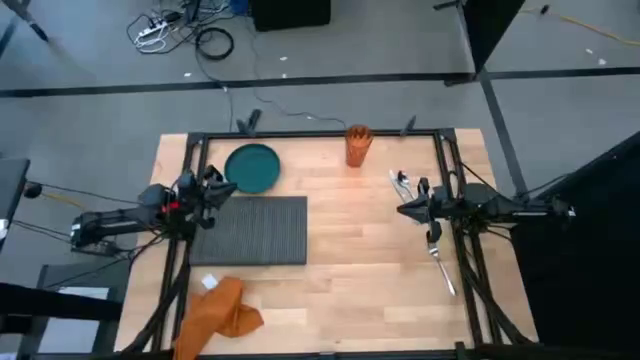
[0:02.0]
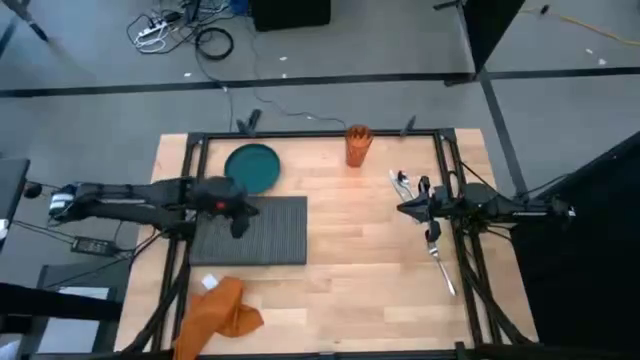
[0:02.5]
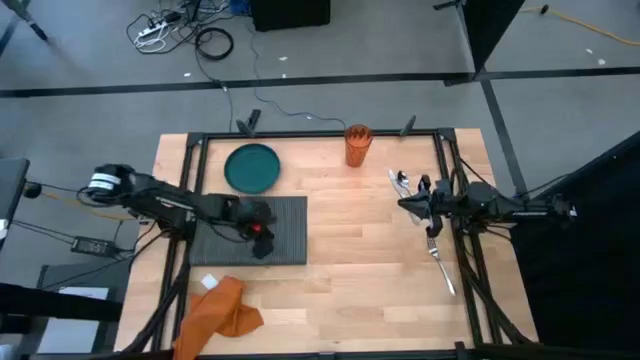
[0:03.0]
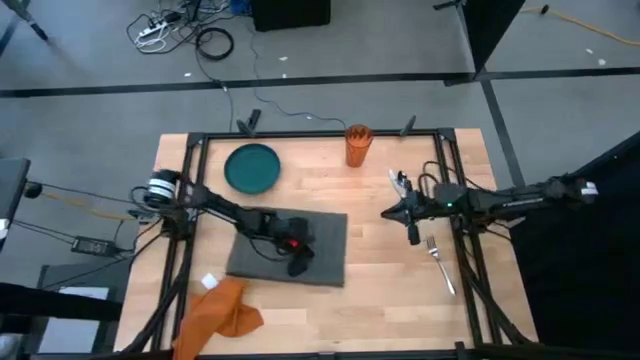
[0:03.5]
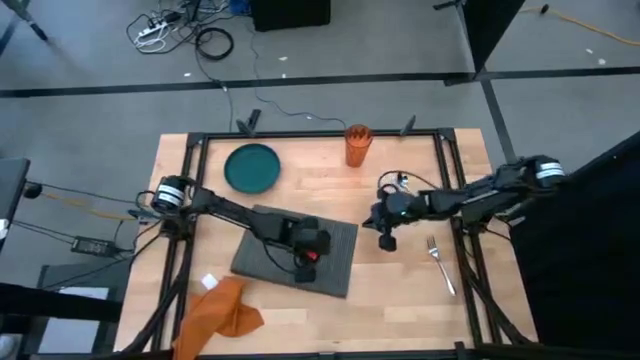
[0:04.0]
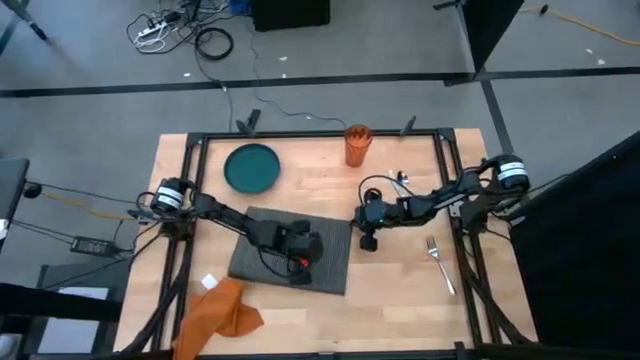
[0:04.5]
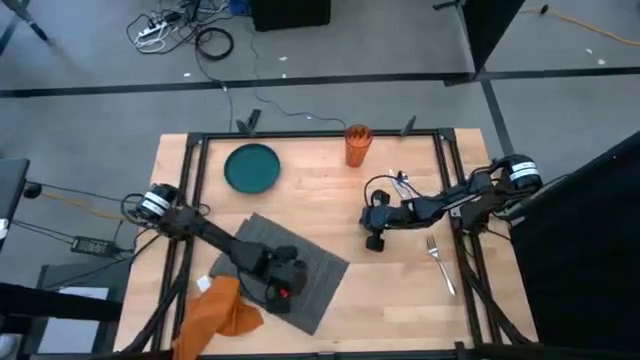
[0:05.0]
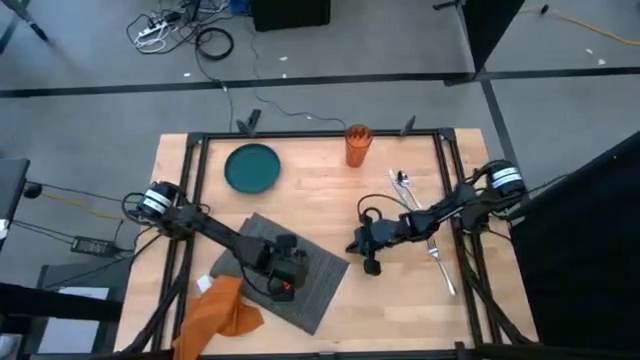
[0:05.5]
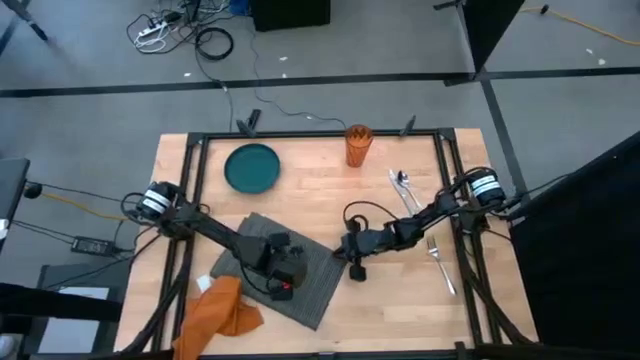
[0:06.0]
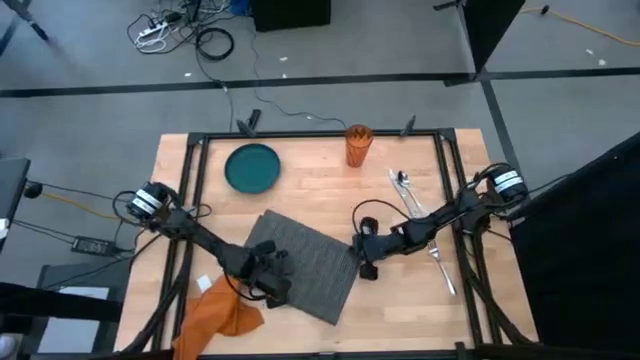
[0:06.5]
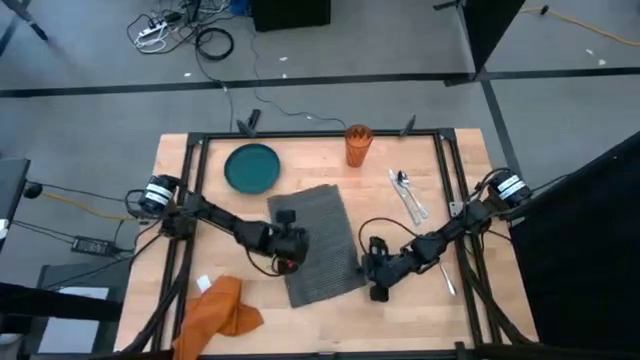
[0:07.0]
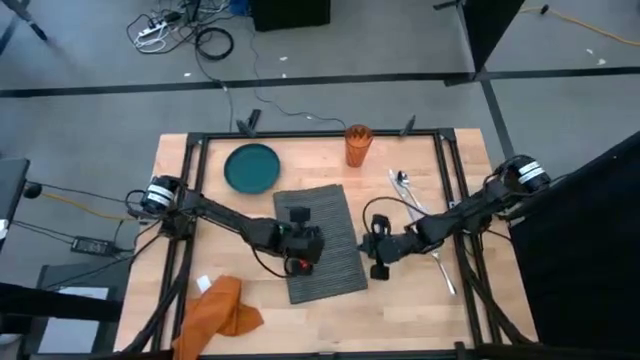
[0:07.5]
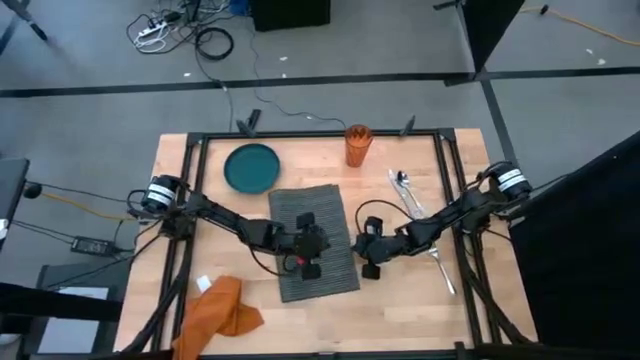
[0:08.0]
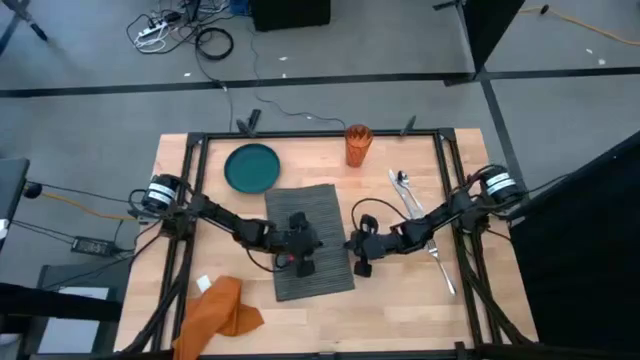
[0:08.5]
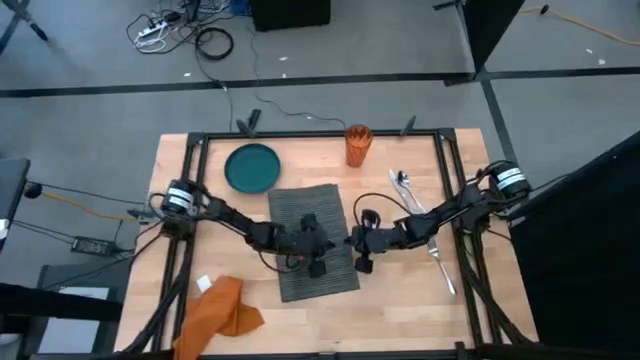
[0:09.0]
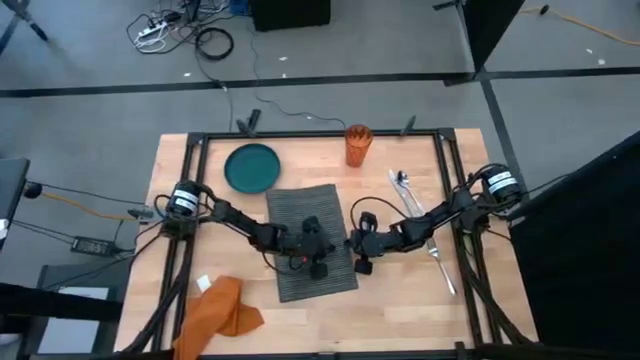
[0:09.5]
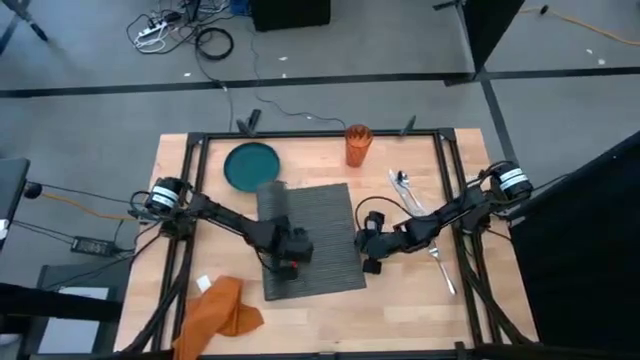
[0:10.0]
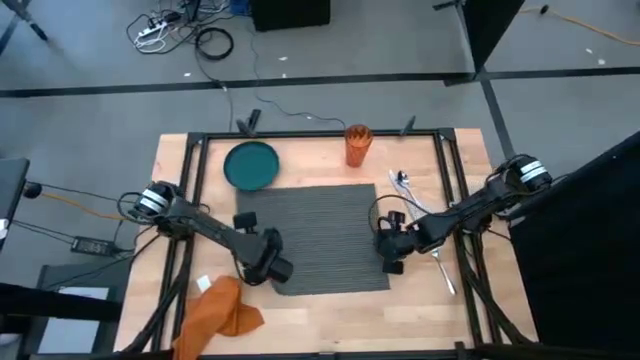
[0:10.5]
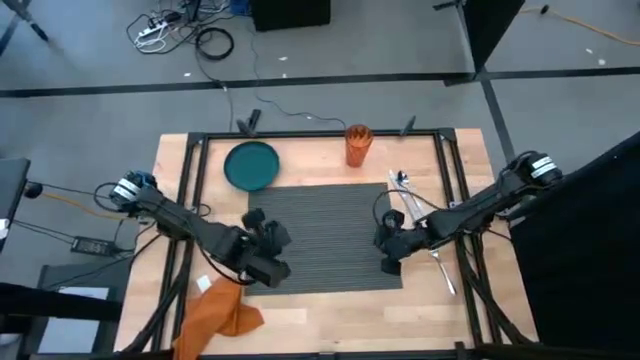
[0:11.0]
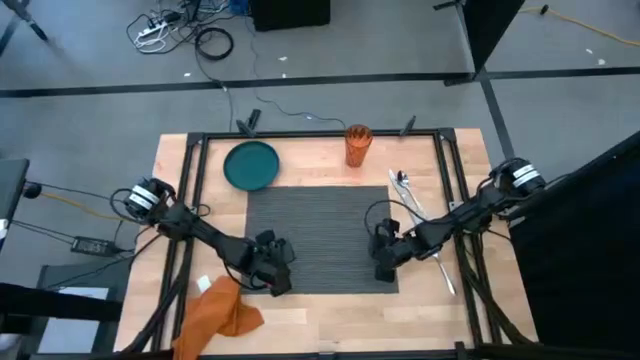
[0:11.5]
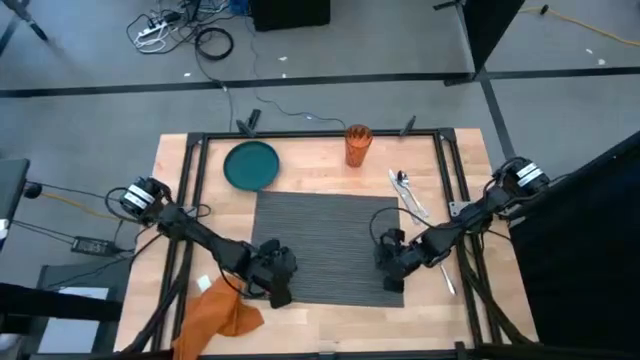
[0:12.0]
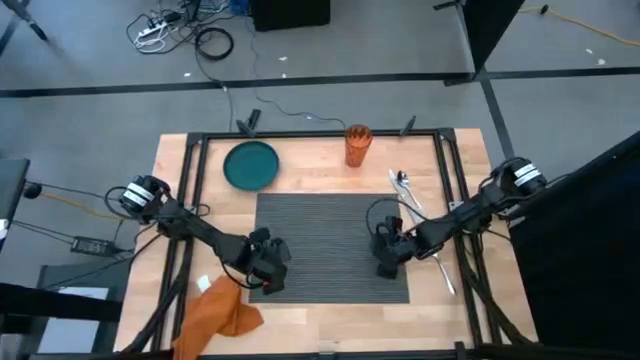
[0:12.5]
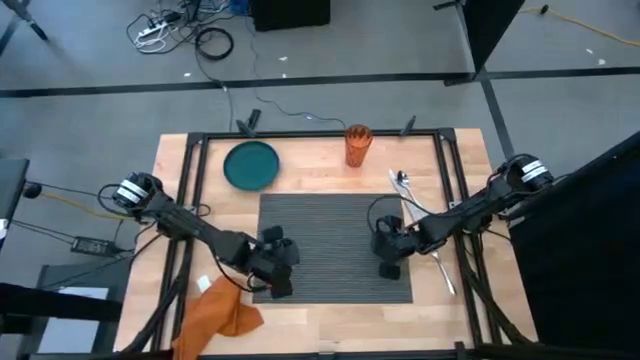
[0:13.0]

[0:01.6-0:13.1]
Task: Set table place
Prepare the black table placemat
